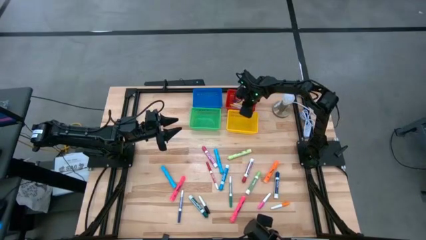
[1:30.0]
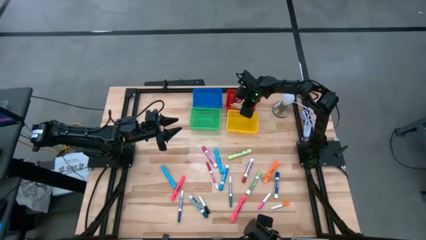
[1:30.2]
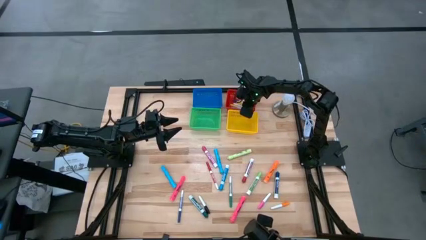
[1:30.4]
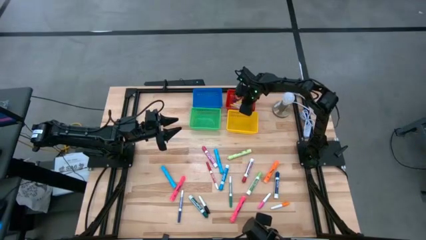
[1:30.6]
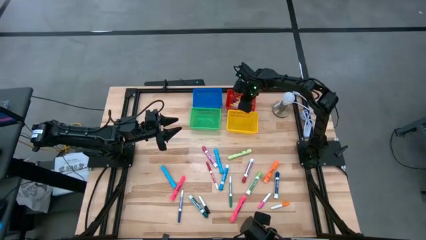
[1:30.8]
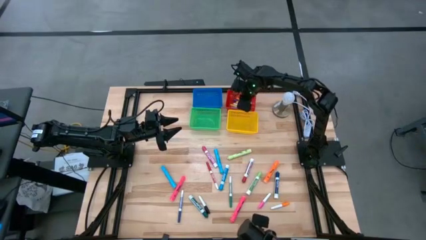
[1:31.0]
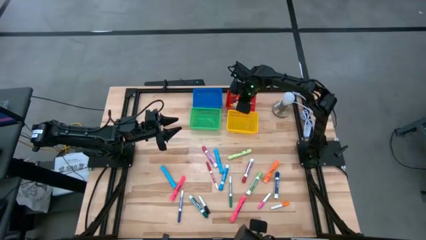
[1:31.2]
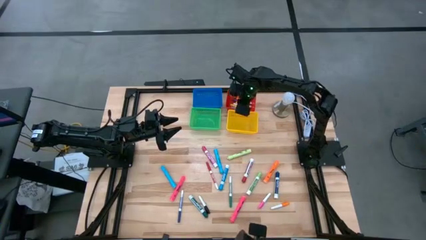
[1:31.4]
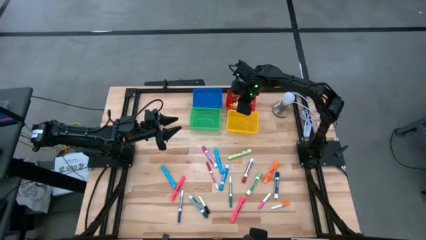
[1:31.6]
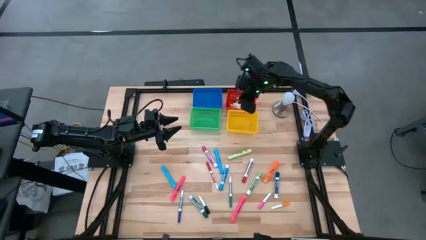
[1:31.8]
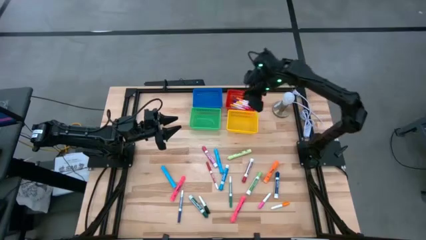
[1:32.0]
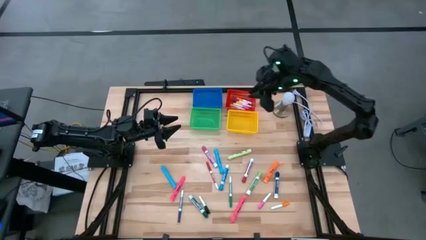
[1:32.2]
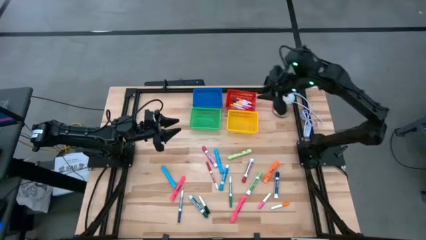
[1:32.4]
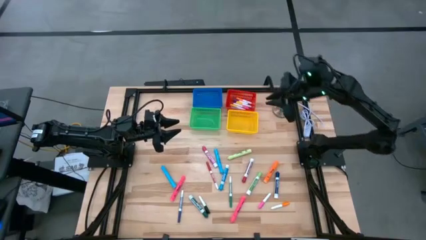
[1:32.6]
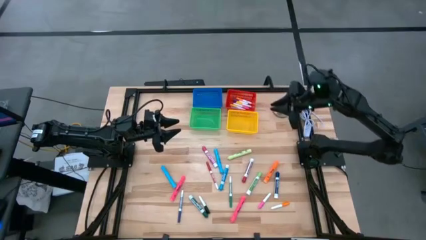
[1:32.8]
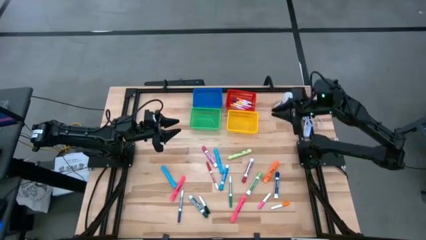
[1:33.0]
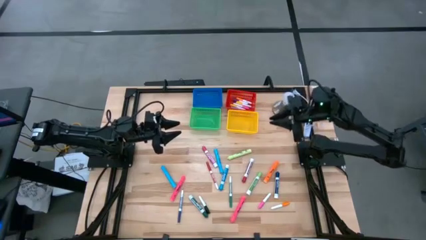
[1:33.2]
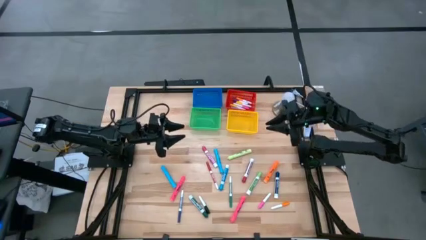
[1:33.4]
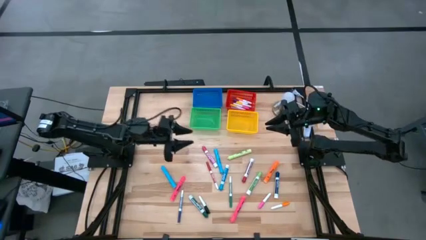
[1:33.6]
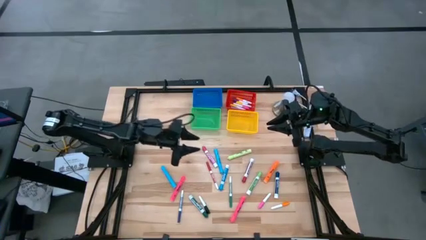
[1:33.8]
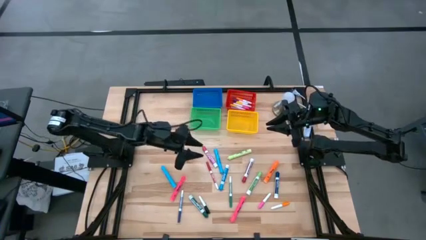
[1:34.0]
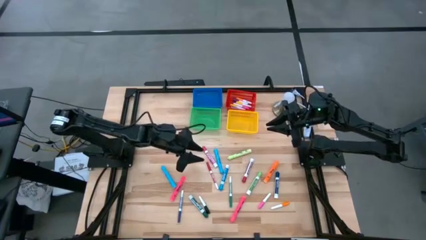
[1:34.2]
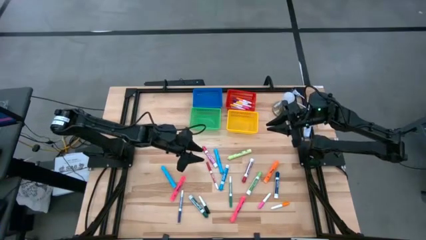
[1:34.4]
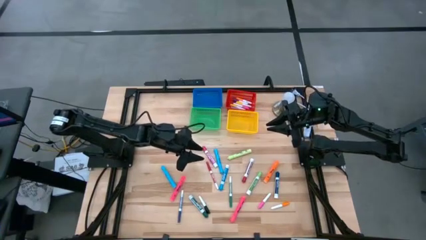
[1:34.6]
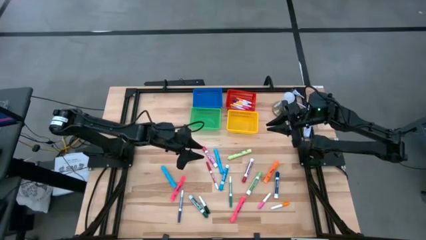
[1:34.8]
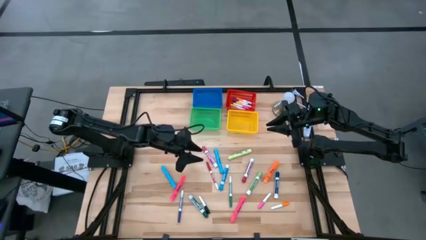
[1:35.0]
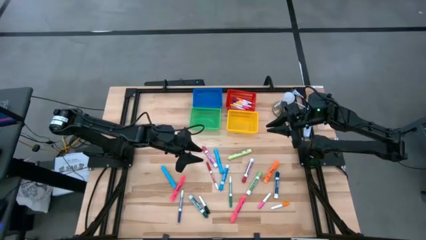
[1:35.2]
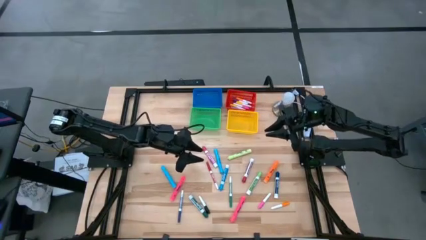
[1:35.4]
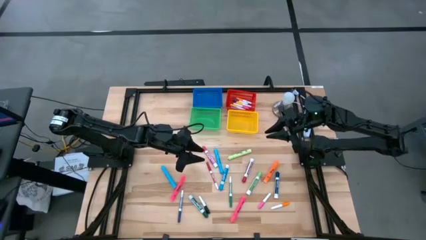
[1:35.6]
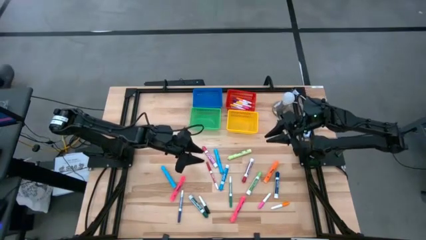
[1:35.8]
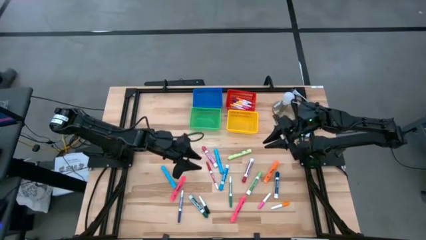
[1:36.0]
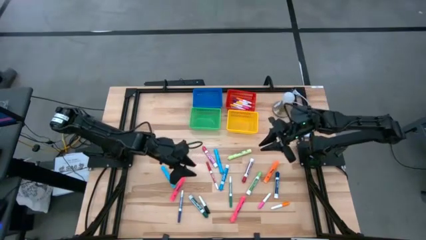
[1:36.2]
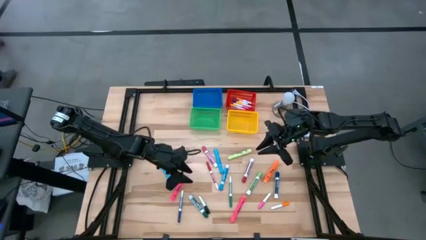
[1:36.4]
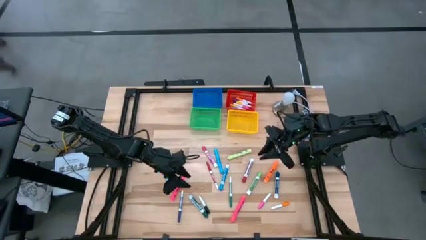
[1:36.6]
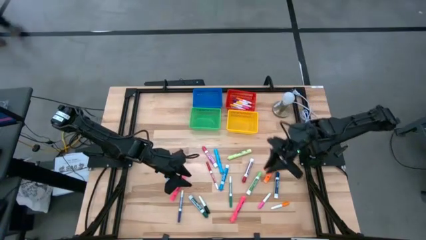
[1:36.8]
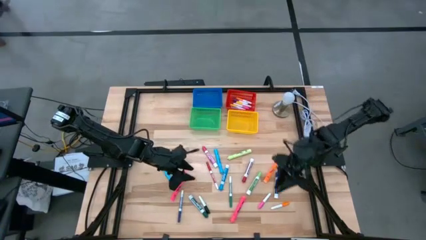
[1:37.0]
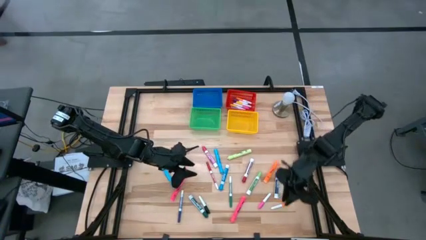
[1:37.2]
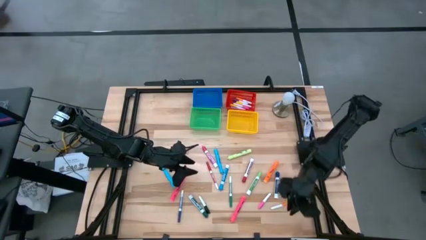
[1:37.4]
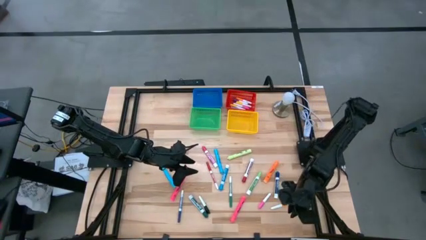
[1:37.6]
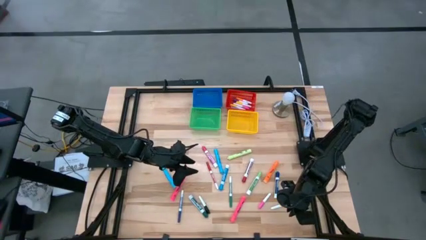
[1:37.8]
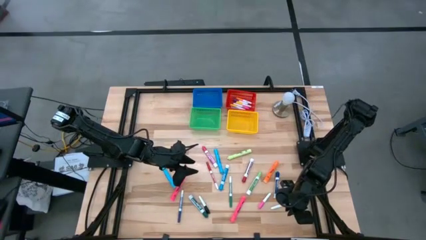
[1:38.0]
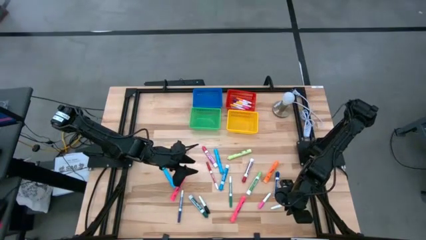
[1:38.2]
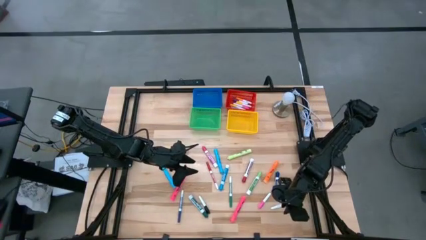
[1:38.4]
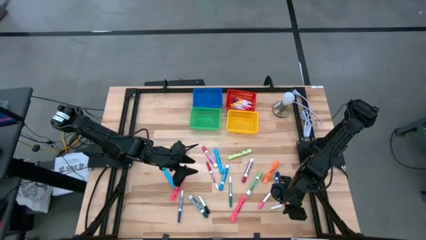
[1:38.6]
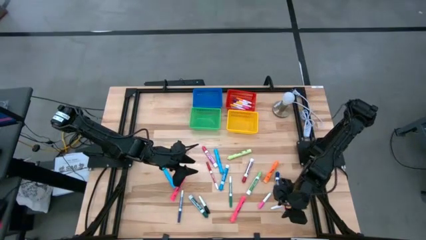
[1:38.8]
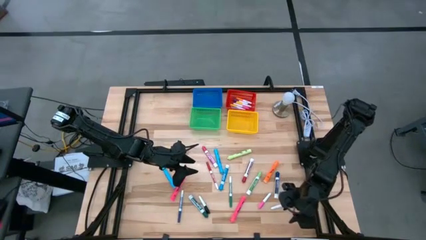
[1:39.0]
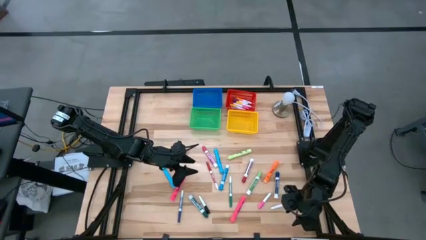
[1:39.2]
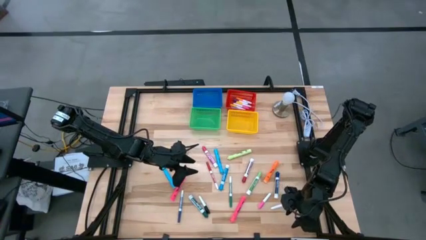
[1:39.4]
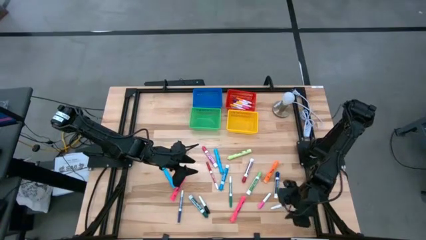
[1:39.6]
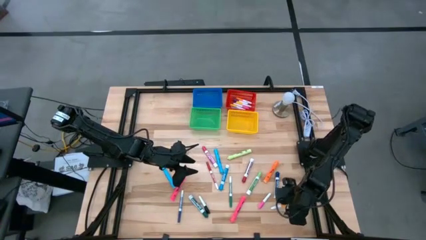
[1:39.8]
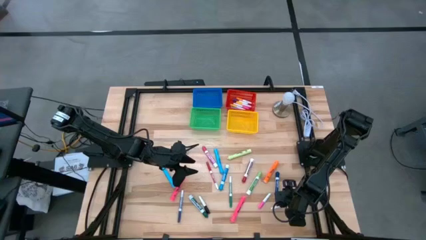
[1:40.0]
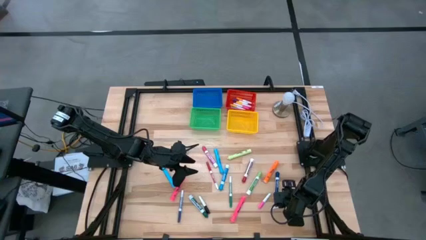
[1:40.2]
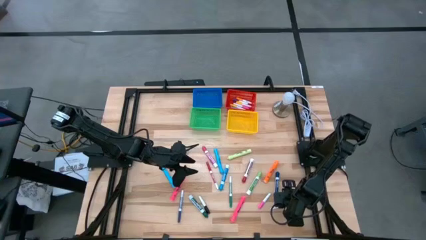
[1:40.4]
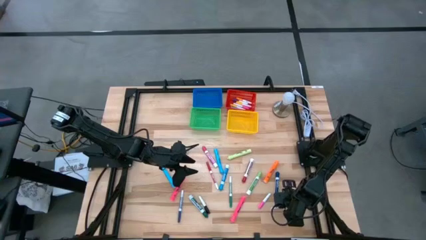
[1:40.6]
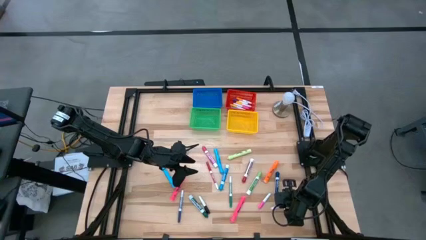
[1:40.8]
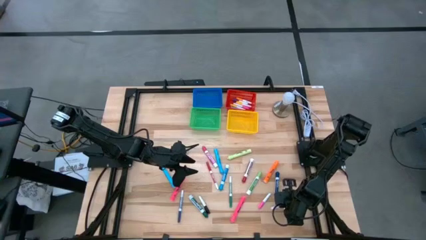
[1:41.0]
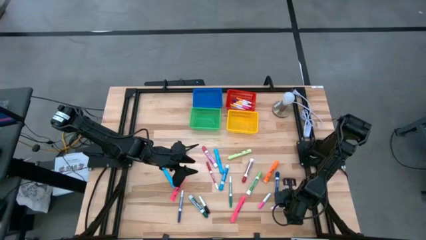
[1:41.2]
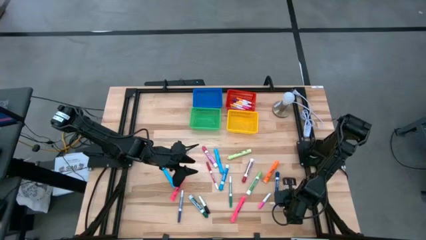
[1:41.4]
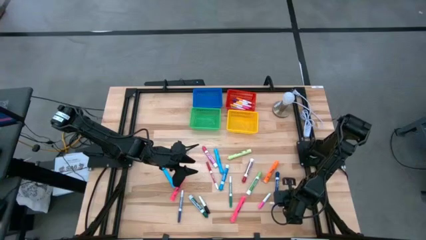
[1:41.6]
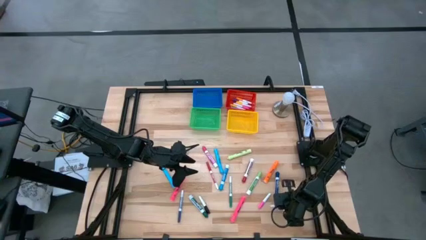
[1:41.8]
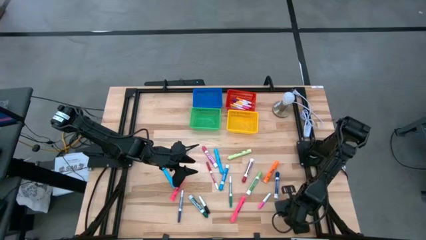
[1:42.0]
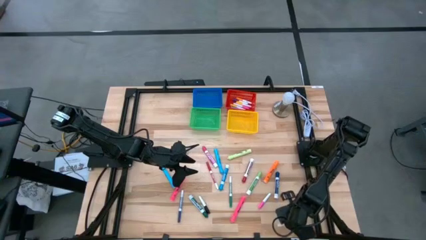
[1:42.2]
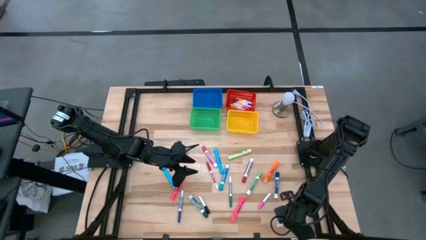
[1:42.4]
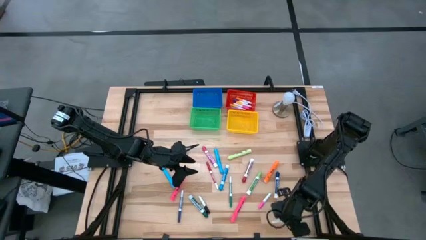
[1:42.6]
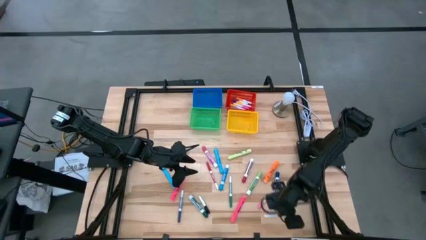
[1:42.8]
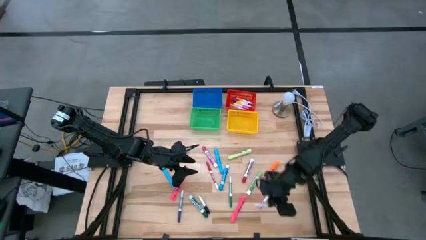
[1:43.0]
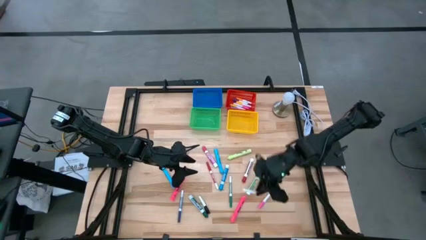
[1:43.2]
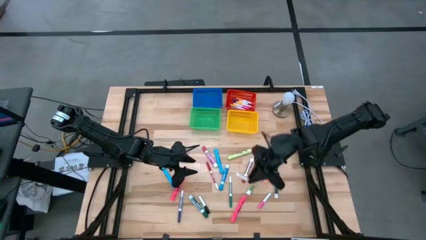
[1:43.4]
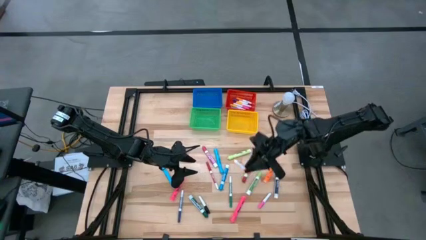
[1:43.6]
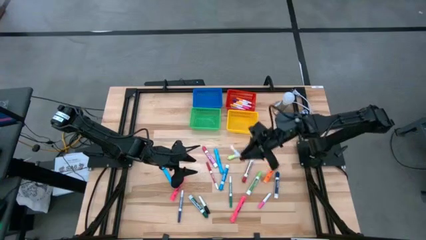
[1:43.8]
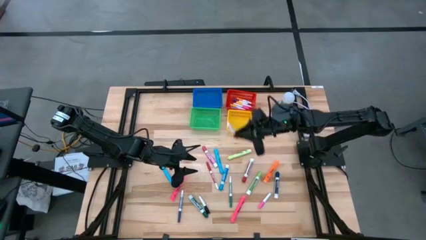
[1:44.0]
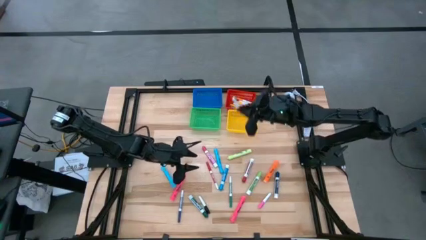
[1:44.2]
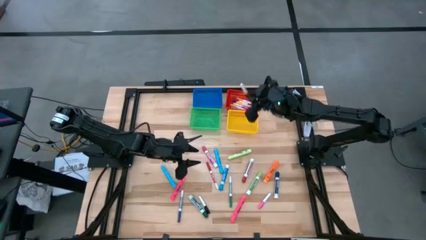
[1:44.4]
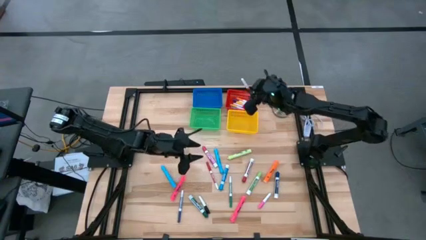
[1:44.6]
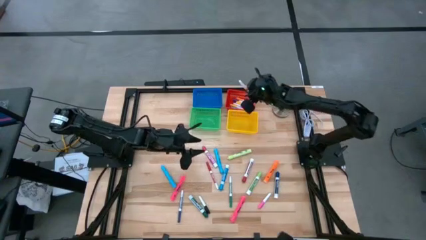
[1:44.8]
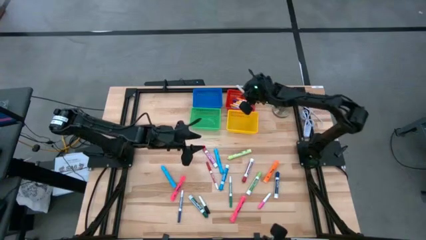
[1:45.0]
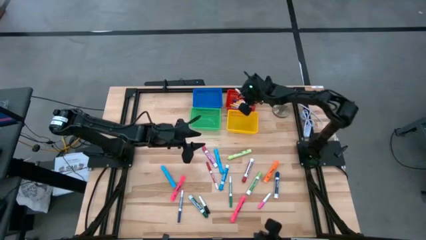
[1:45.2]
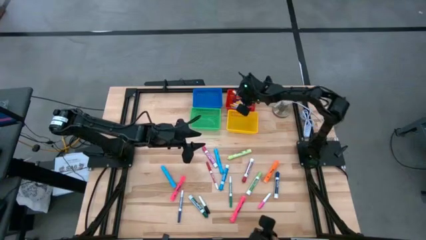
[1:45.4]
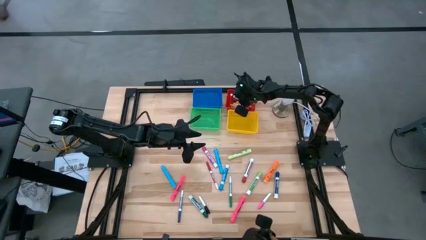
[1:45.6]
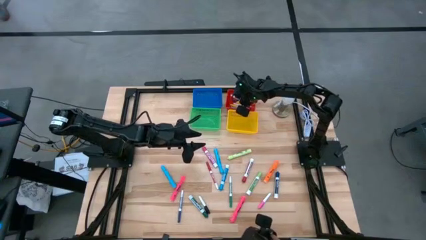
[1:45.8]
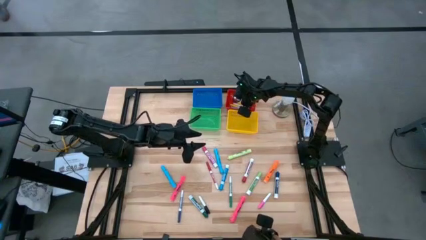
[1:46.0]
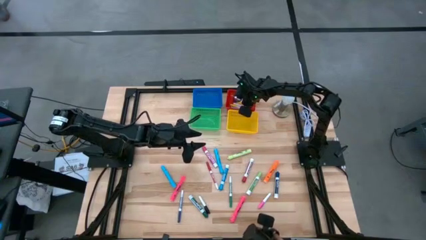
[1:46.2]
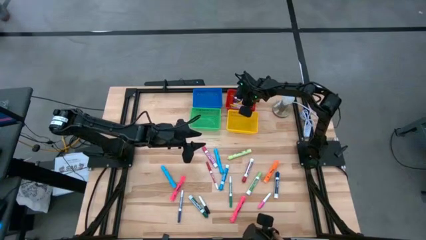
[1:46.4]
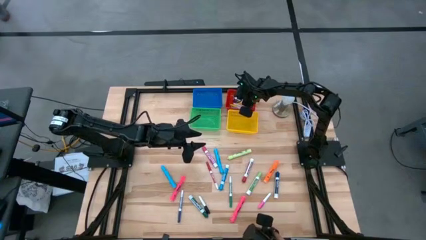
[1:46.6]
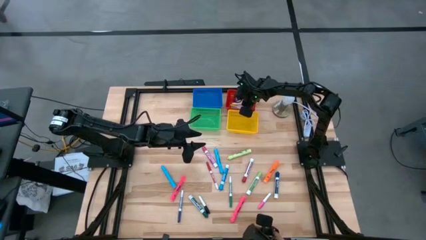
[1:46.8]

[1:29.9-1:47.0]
Task: Pick & Place Markers
Put the orange pen into the red basket
